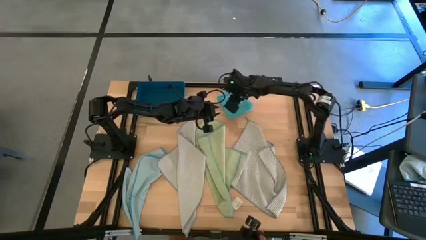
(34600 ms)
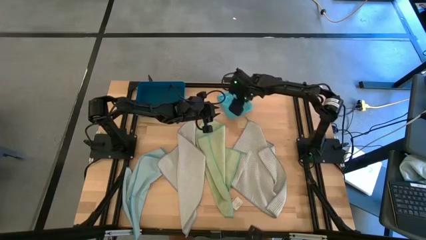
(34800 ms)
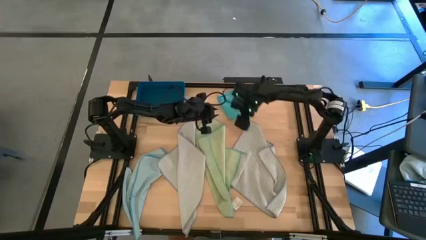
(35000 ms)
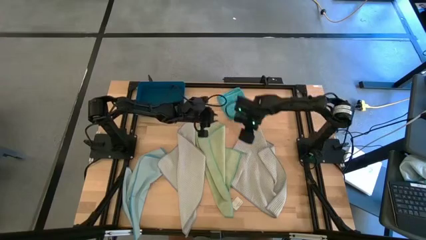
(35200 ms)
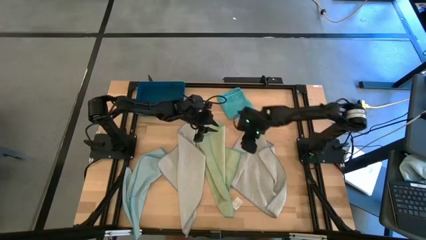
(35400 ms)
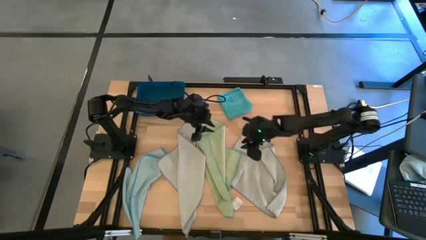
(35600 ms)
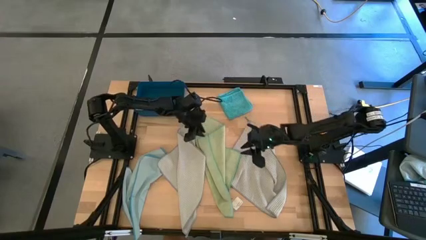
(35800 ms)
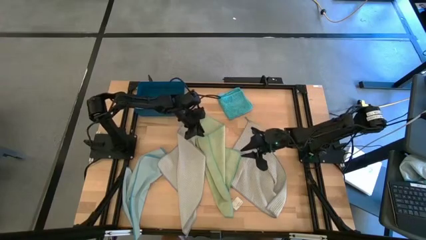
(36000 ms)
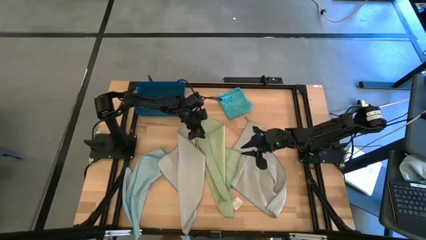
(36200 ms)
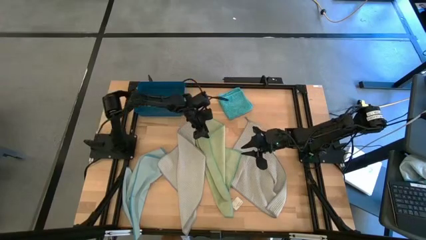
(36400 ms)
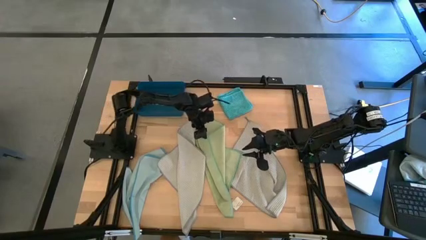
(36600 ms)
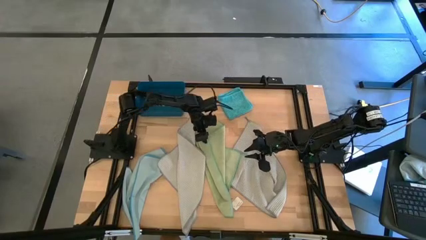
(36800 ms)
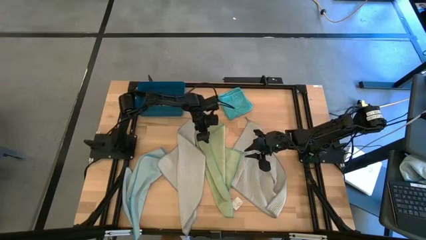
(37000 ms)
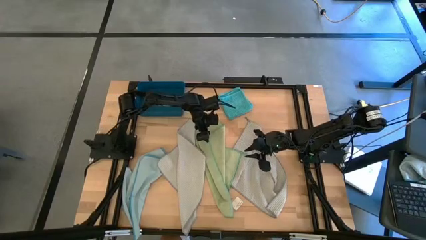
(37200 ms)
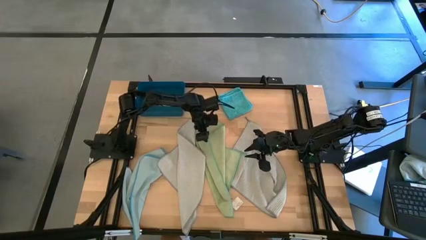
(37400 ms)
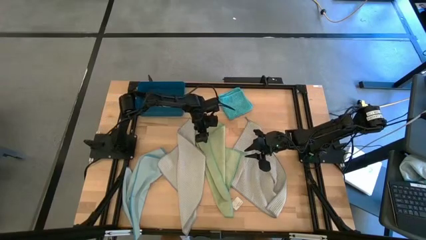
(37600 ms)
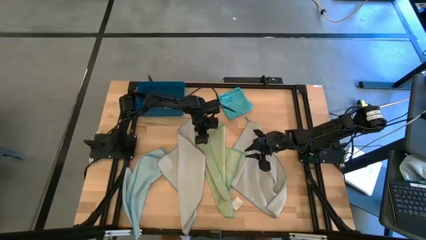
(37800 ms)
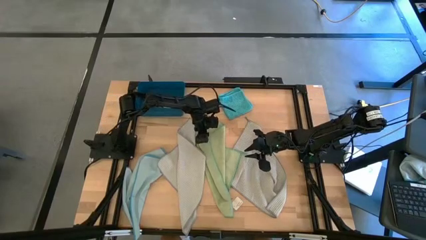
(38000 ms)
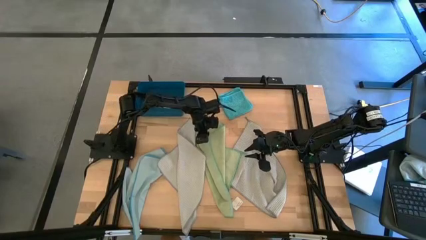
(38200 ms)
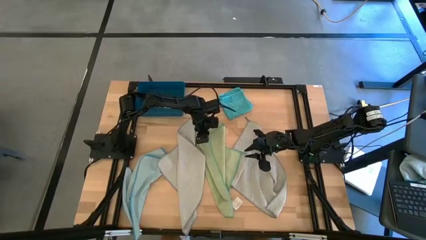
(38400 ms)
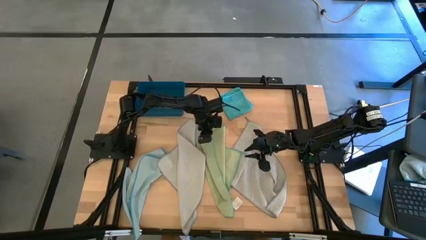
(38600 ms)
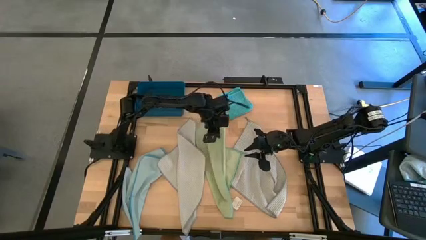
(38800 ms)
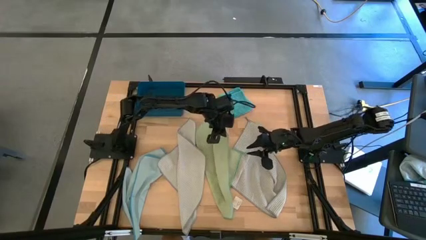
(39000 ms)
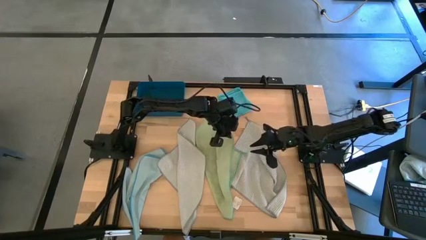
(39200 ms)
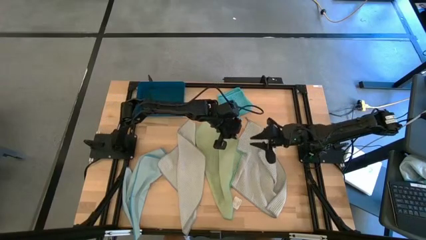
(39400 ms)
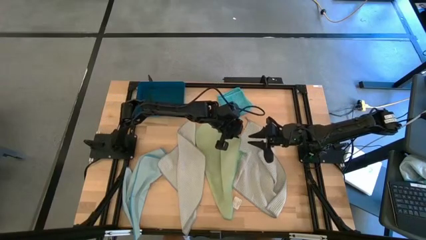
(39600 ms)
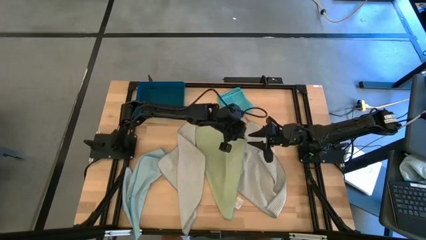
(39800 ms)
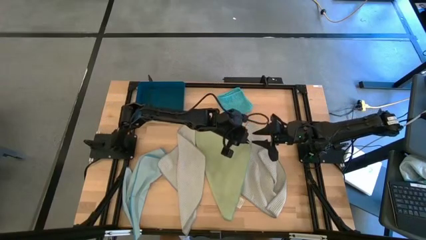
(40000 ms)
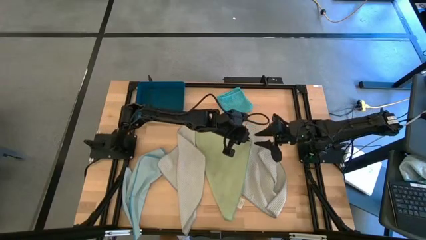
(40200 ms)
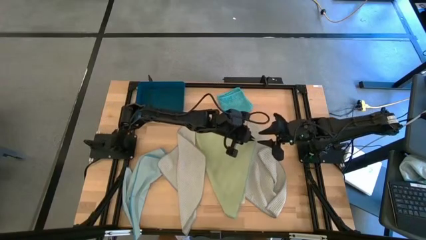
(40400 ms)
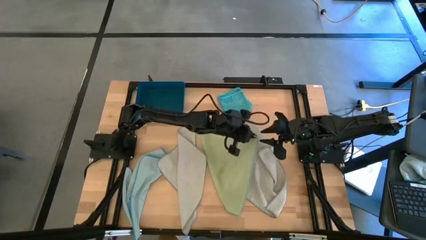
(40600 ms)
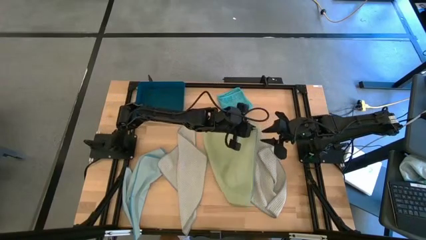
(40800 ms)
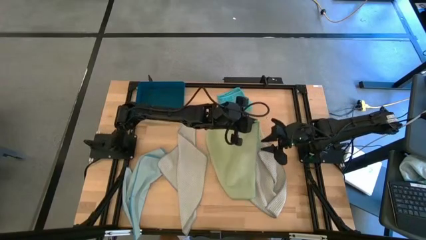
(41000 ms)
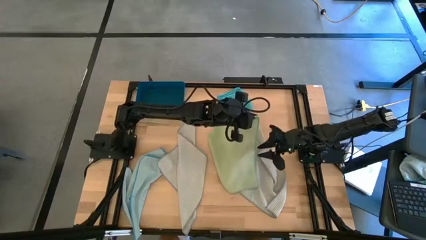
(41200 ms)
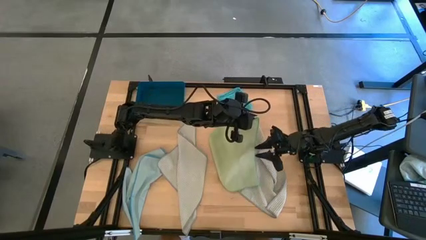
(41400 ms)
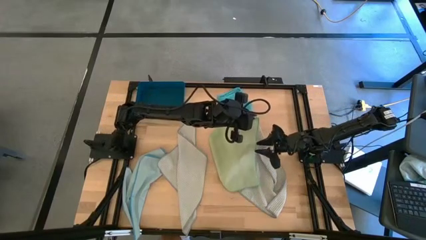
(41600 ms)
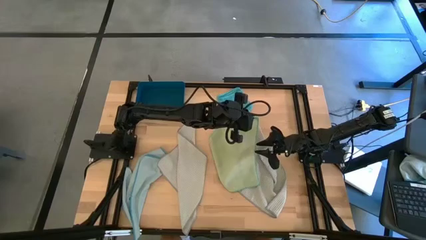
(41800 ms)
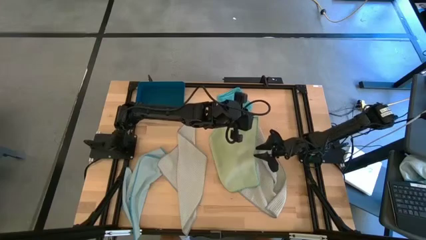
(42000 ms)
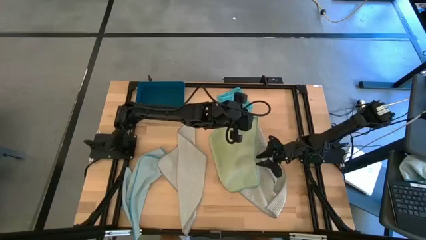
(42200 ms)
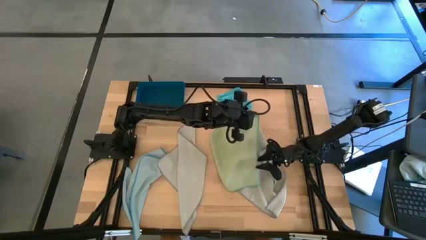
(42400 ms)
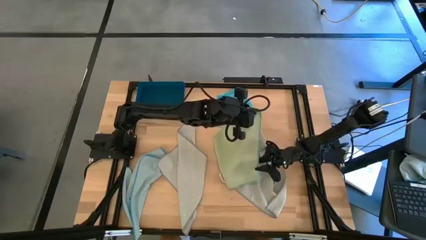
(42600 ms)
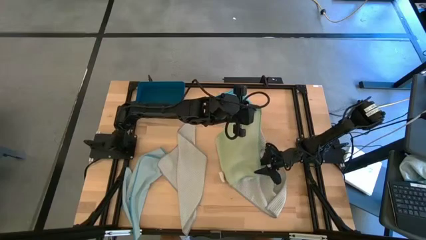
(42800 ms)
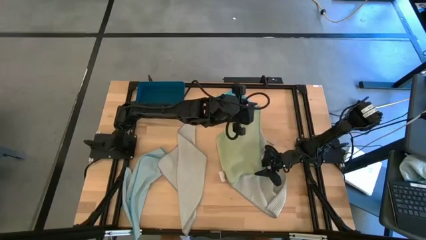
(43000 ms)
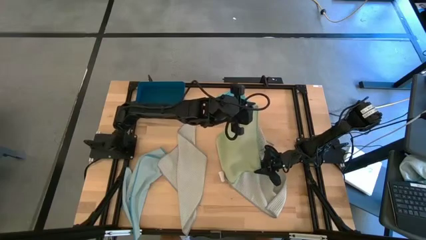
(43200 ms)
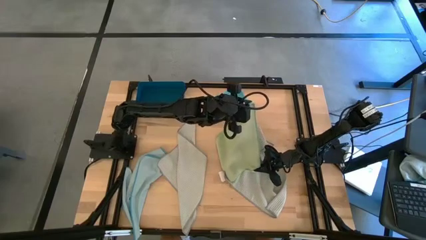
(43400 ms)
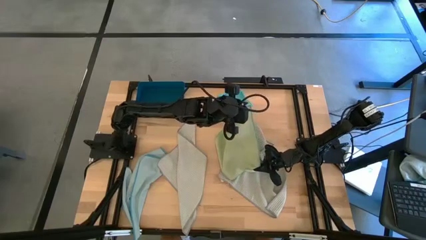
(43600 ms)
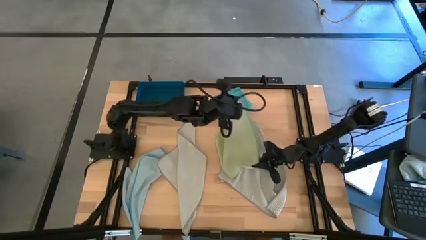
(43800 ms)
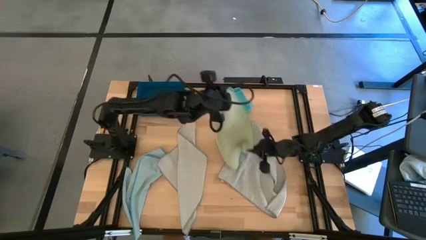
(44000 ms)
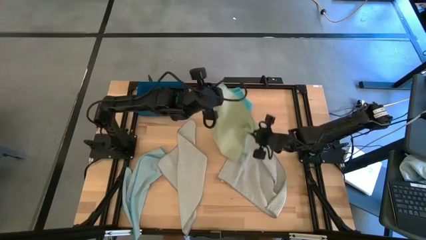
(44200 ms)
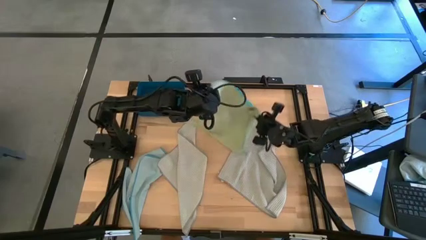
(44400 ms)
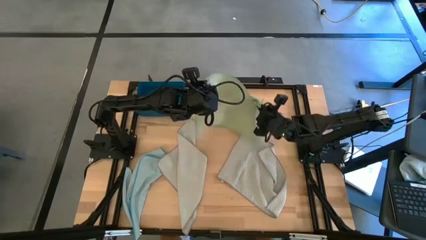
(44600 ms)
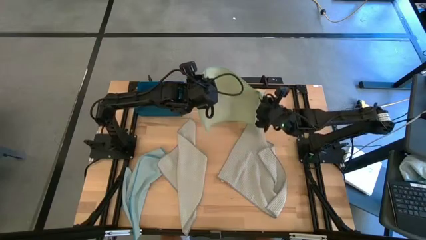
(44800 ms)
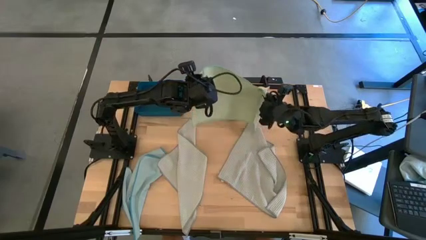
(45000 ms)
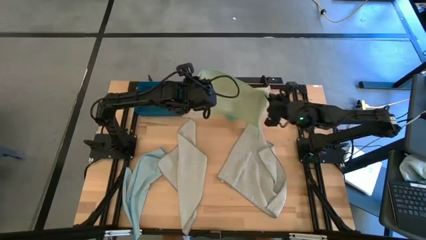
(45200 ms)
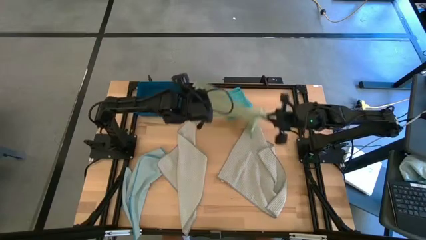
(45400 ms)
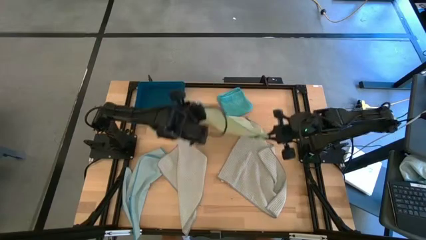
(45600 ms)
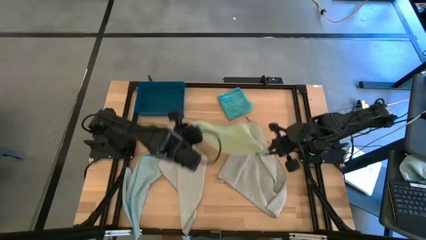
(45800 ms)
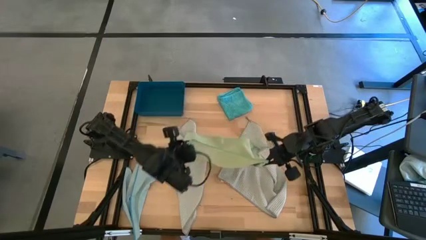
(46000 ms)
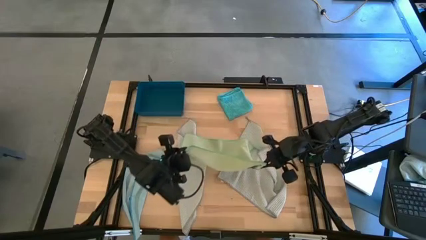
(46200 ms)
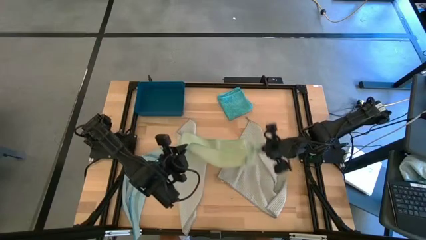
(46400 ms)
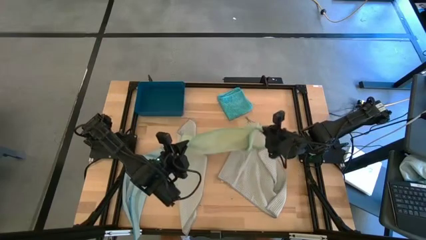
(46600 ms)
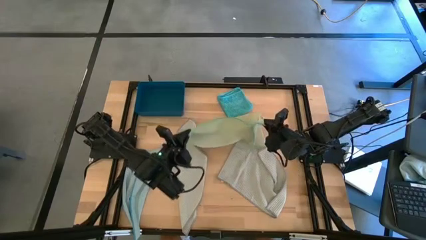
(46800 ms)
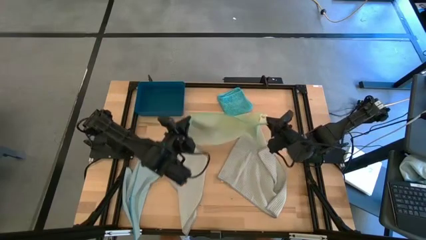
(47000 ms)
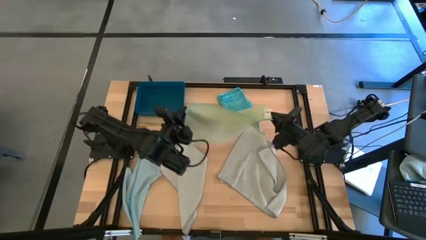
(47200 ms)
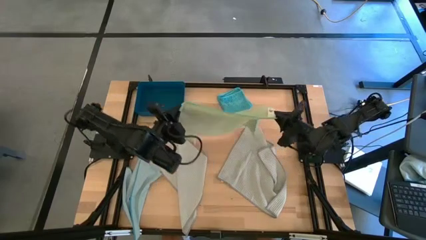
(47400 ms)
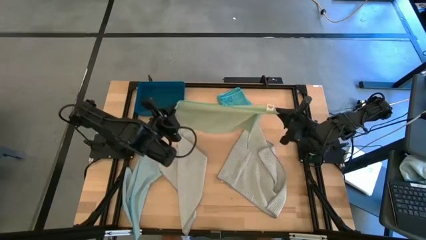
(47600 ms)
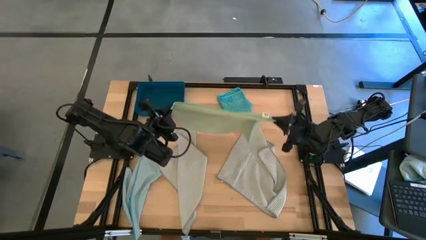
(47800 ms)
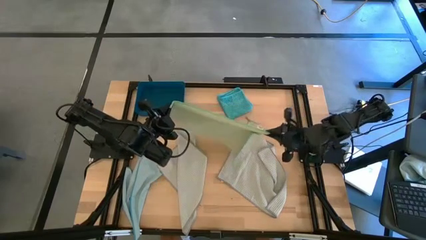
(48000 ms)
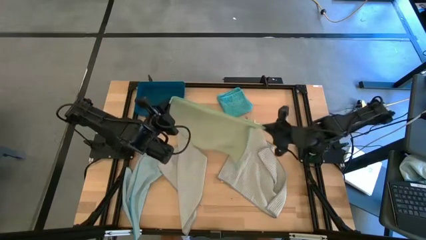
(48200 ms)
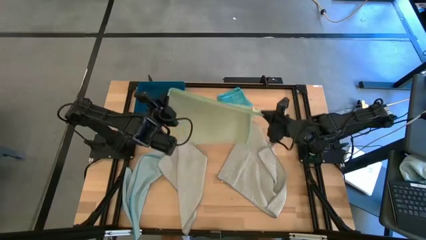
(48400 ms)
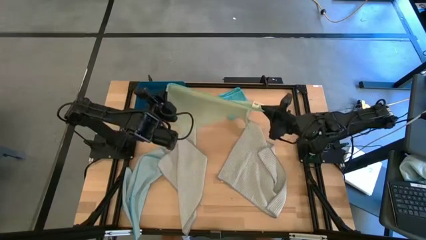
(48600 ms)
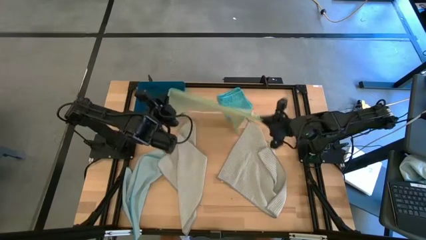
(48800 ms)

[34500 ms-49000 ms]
Task: Fold microfiber towels
Fold the green towel
